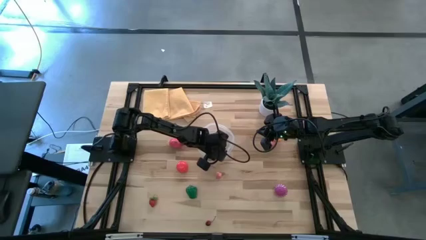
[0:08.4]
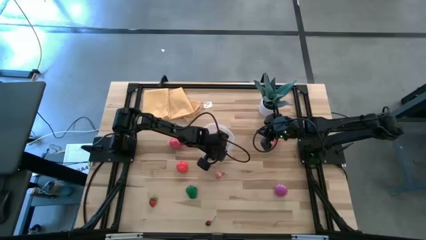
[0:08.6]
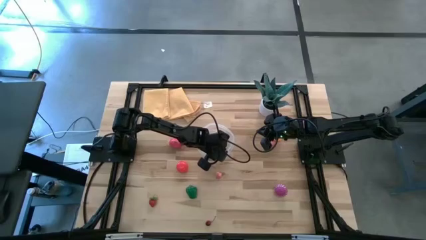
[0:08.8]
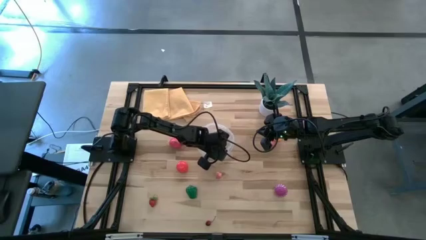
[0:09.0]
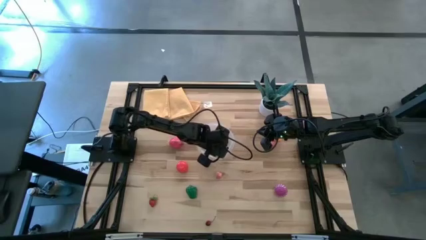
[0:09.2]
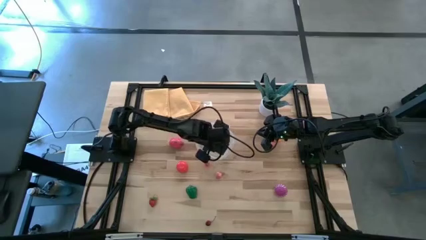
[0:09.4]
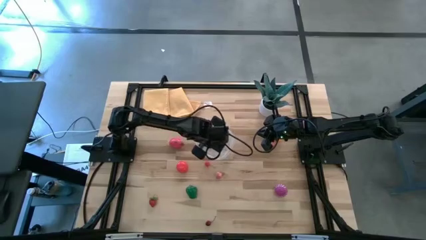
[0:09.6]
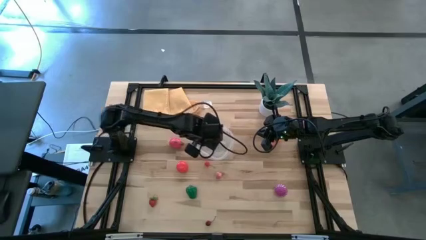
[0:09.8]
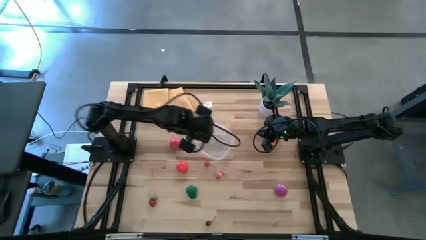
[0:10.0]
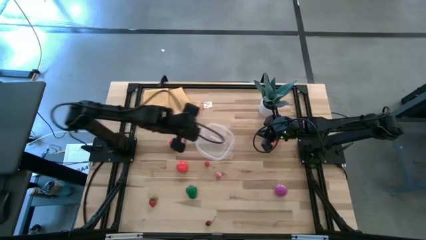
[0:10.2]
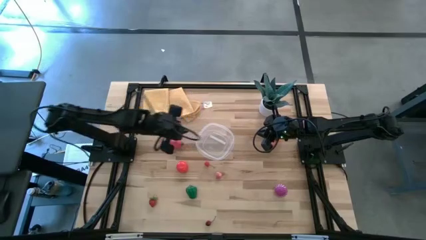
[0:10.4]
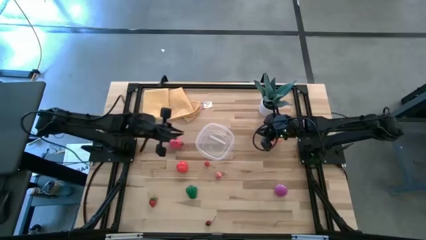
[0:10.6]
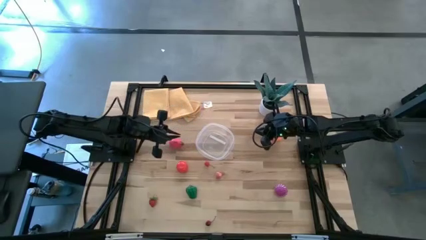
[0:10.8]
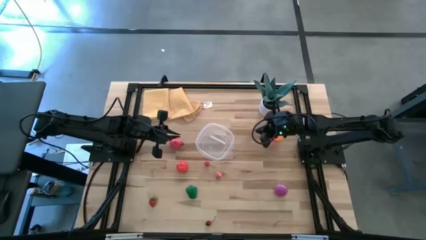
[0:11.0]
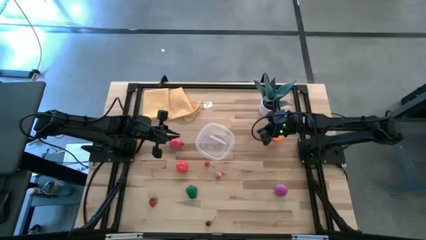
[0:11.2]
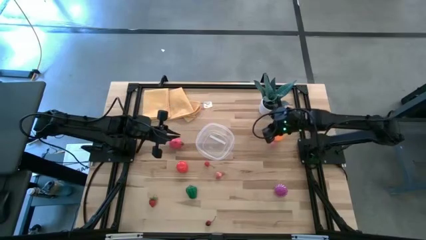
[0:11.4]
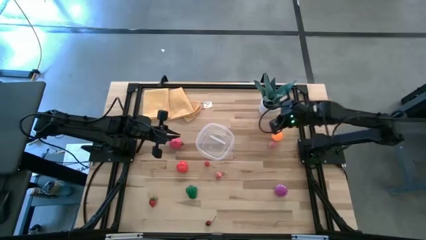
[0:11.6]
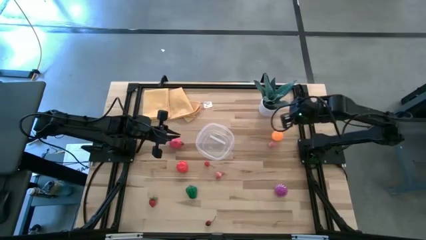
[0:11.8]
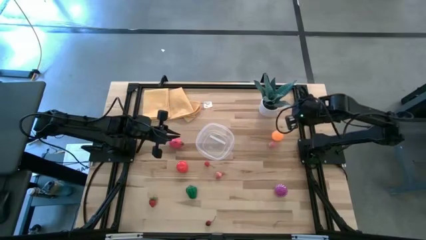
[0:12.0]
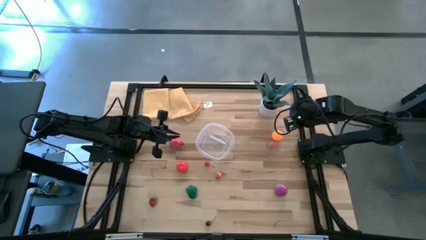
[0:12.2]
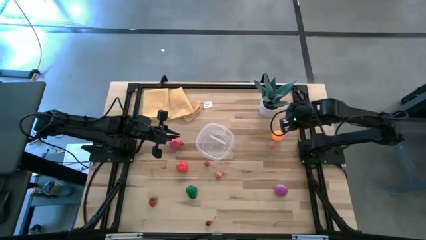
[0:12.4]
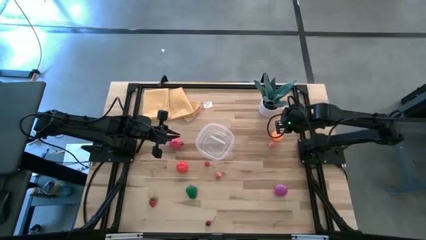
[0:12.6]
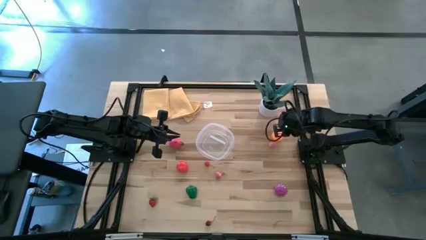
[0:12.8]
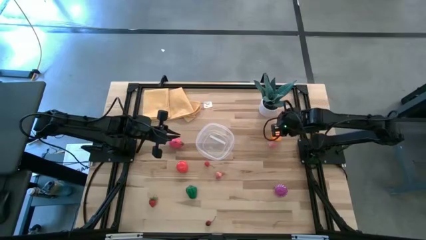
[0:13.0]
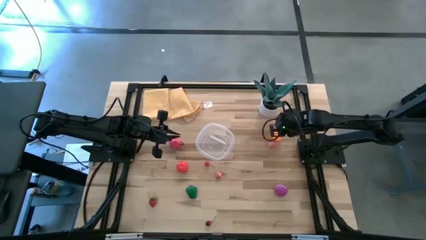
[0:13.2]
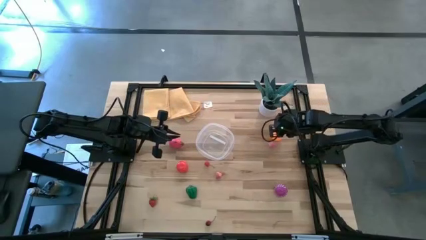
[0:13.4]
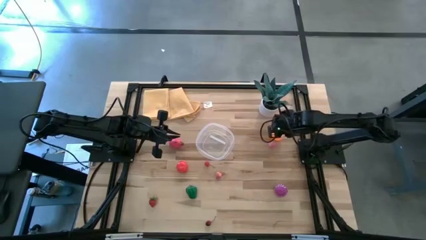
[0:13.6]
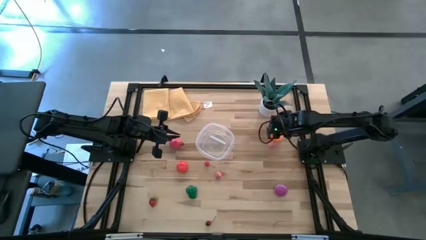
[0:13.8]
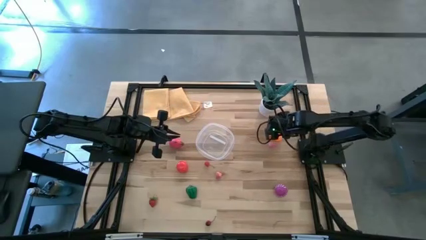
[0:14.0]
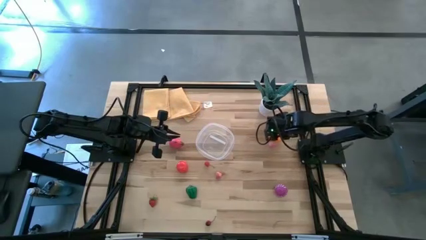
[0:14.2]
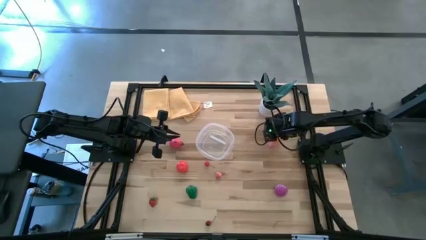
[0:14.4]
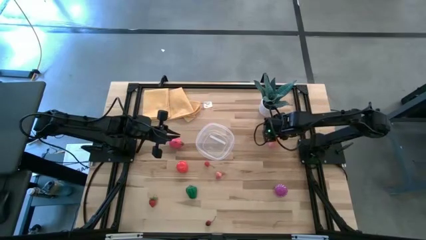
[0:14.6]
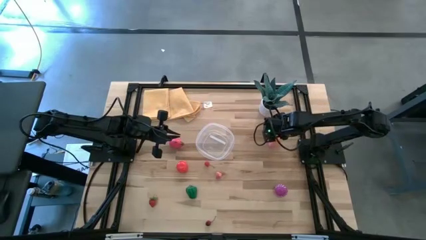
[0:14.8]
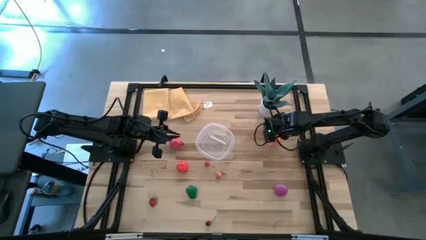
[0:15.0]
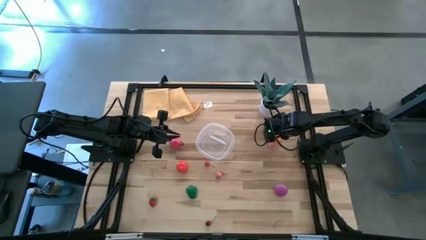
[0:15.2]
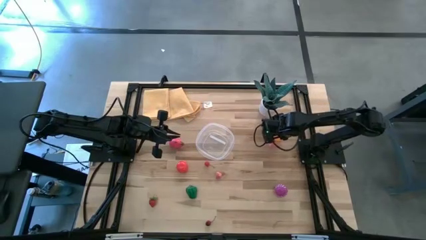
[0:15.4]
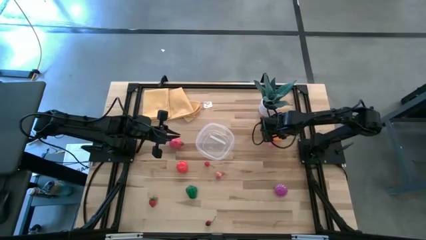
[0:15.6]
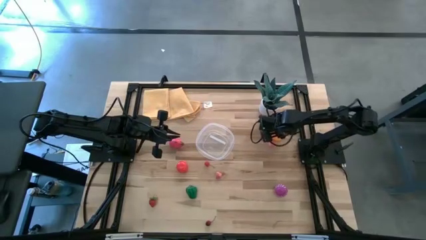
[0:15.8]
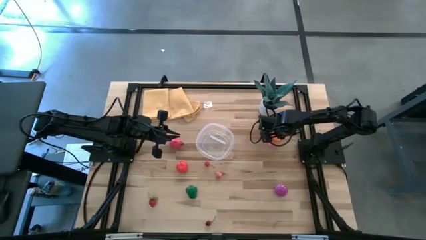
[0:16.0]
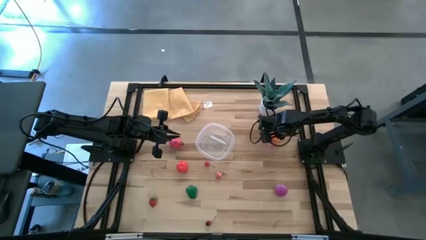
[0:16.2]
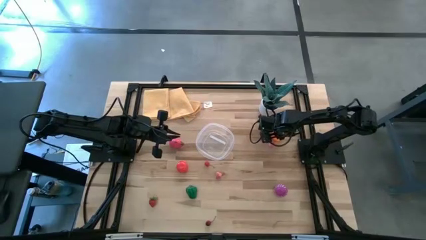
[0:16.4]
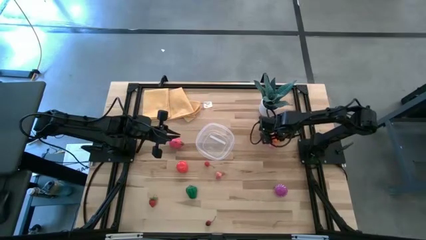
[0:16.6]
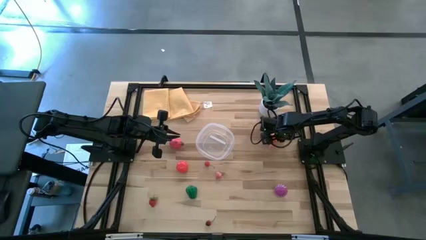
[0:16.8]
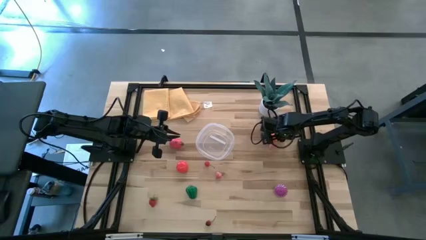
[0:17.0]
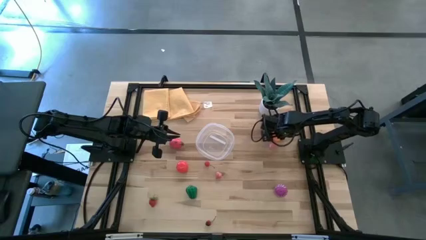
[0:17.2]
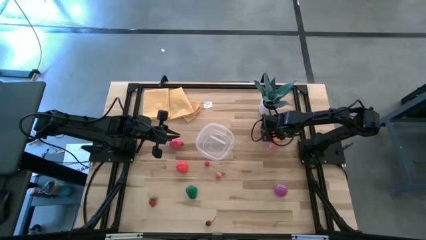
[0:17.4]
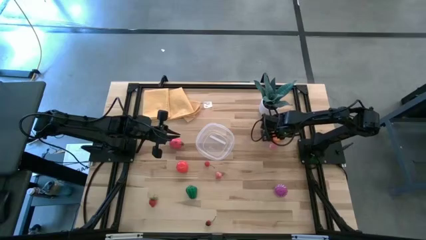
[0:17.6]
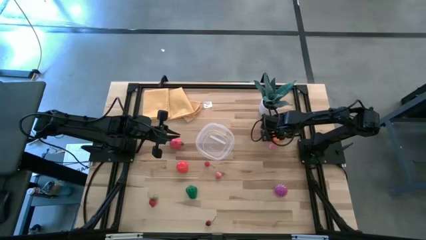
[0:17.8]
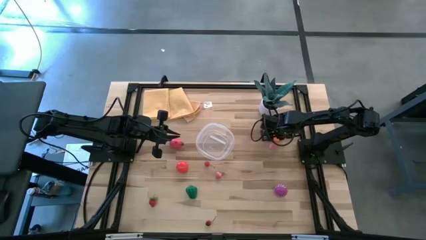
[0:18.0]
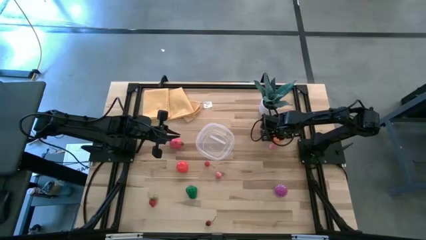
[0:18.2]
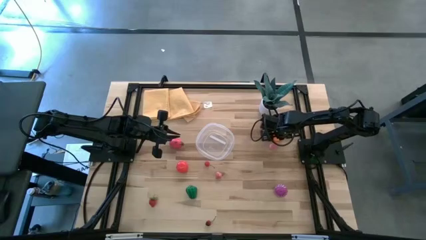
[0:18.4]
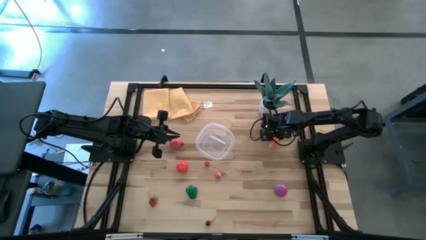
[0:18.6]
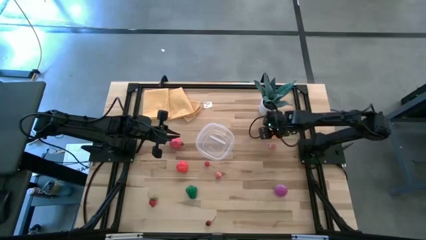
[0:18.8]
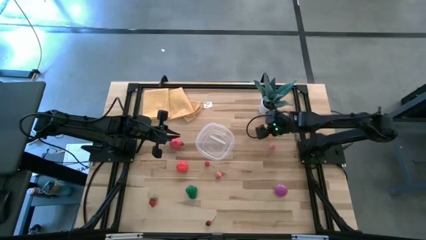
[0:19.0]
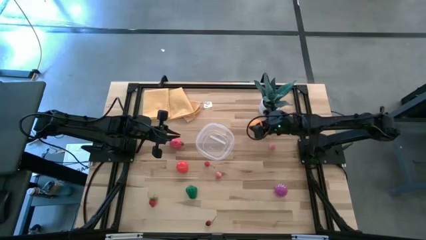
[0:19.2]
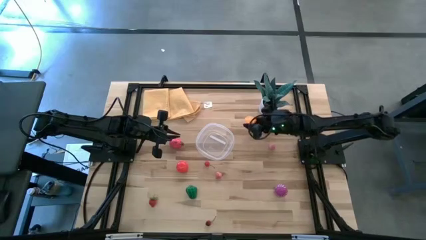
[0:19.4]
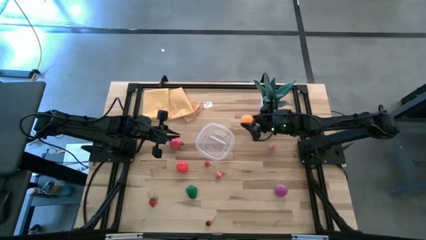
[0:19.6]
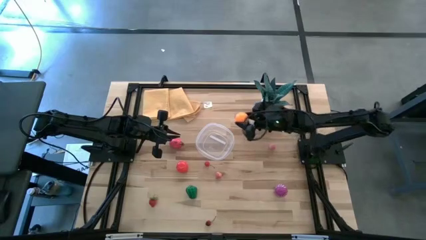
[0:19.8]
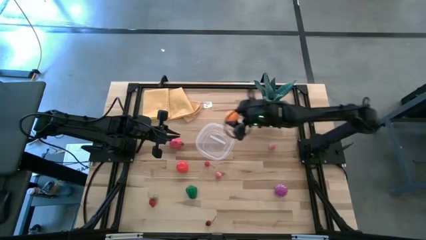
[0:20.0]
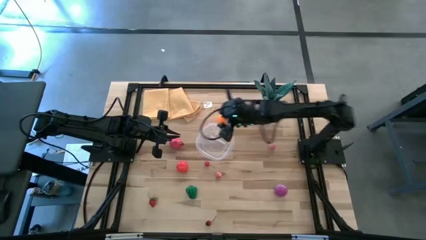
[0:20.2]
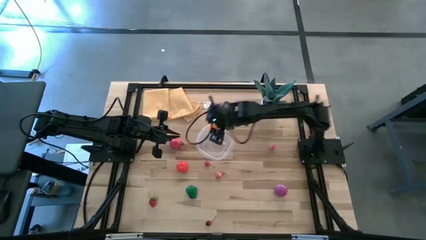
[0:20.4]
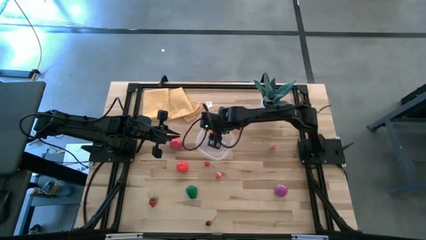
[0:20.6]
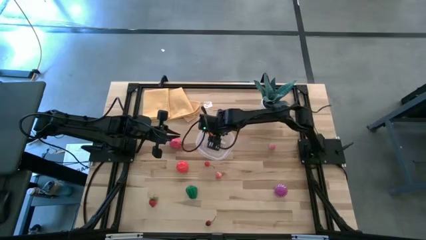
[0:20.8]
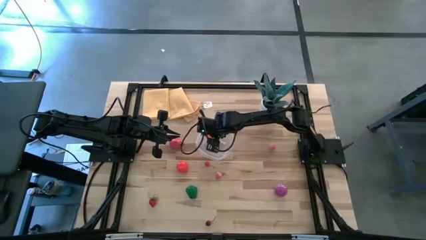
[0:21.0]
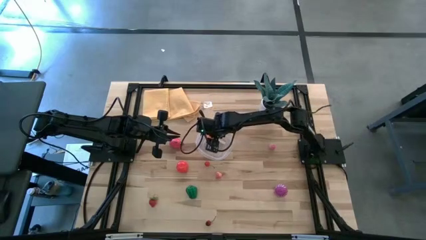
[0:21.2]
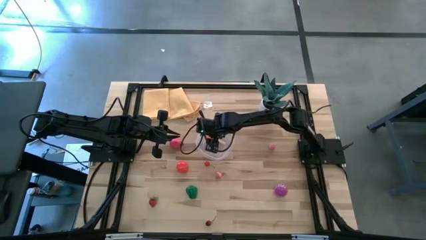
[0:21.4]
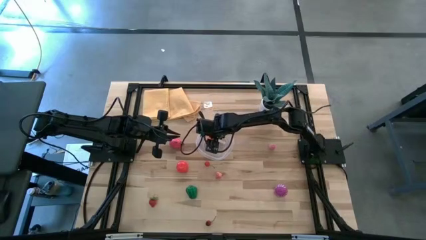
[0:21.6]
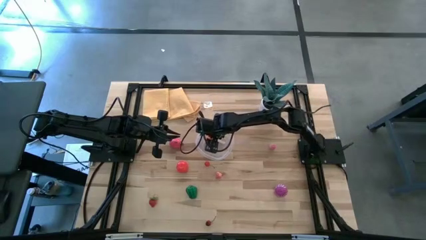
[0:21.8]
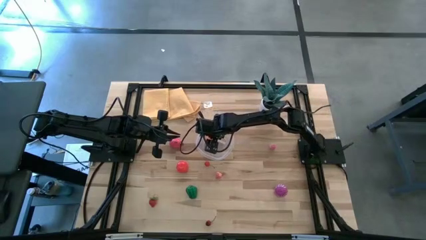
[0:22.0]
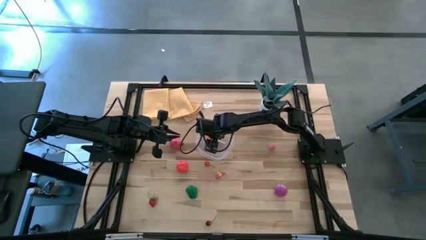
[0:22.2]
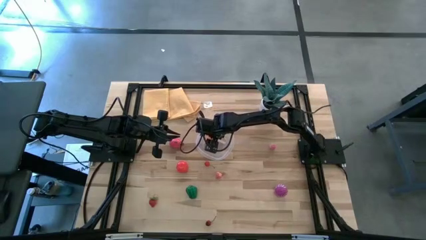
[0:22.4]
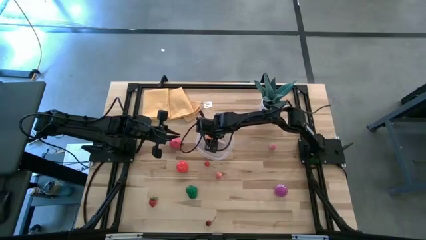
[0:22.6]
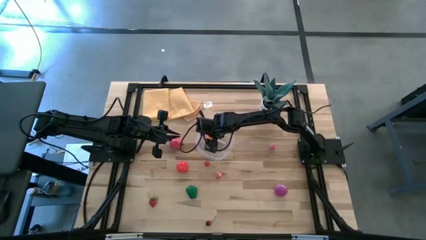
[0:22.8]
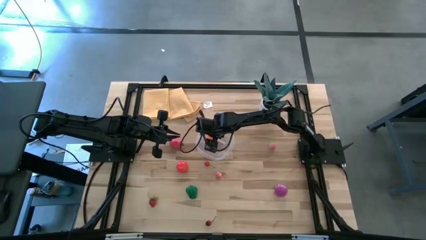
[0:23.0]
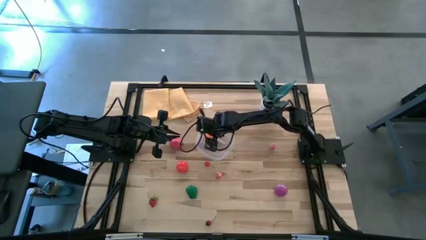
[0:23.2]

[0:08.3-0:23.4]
Task: Pick and placing Produce into tupperware
Put the orange into the transparent bin
